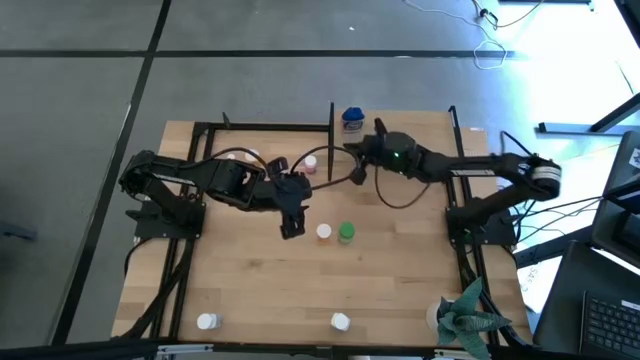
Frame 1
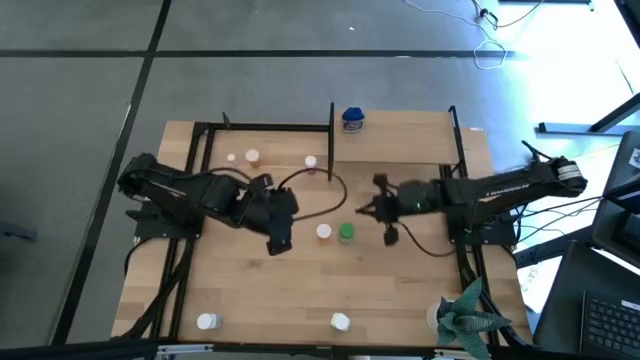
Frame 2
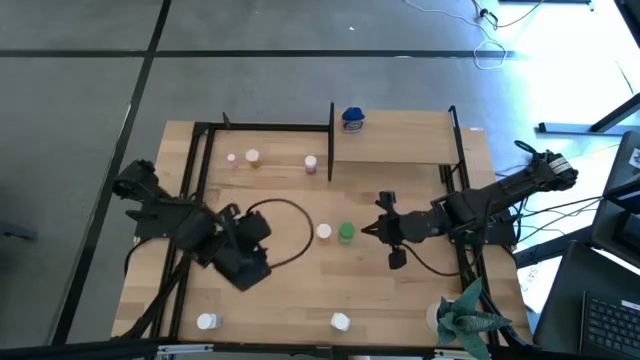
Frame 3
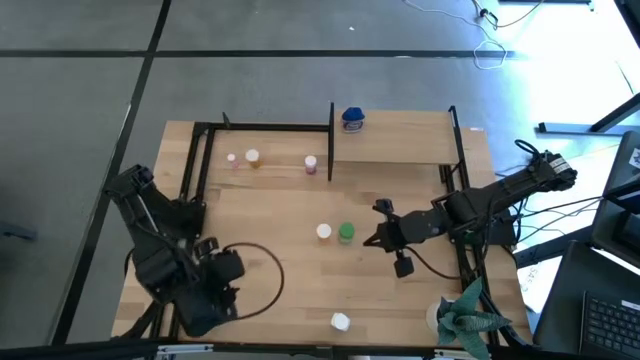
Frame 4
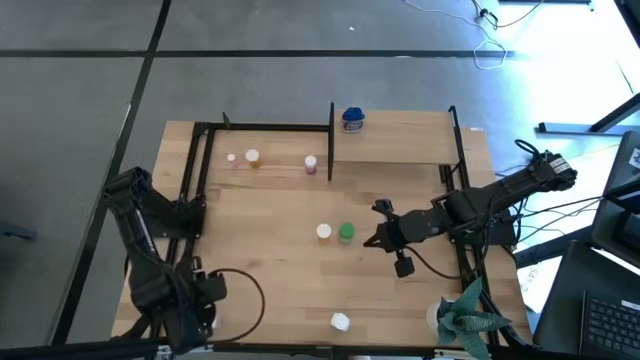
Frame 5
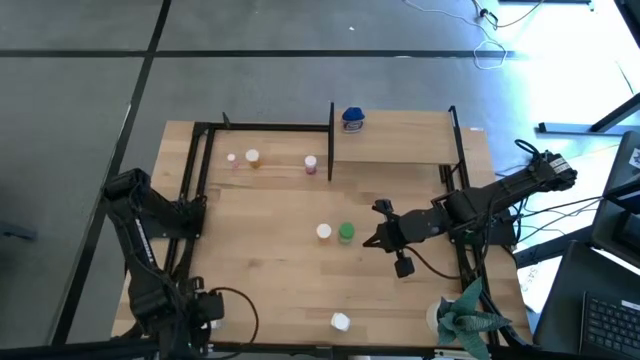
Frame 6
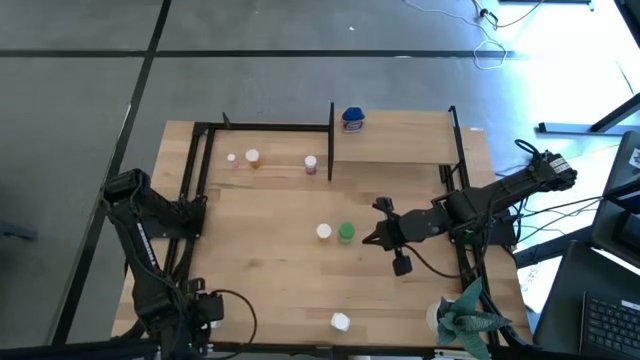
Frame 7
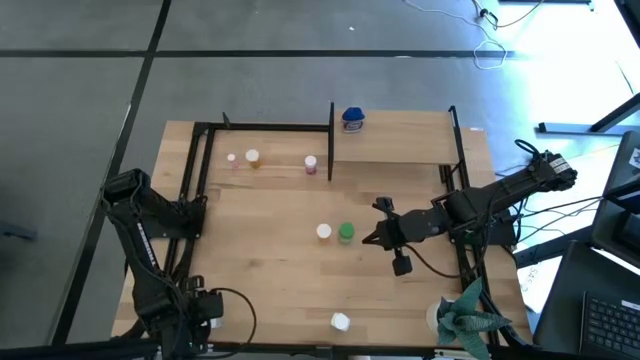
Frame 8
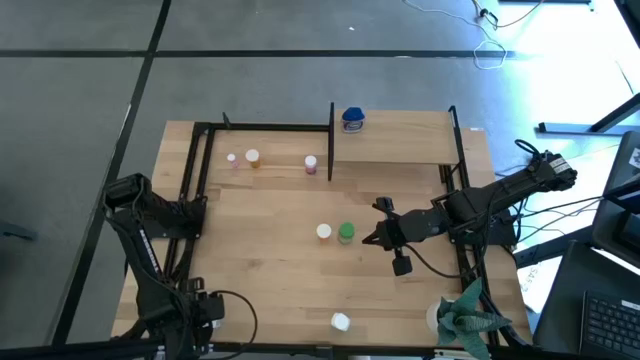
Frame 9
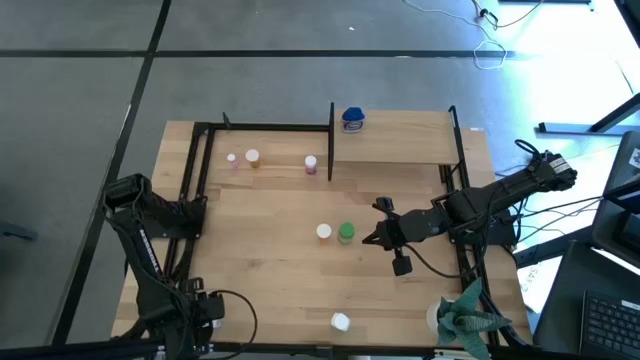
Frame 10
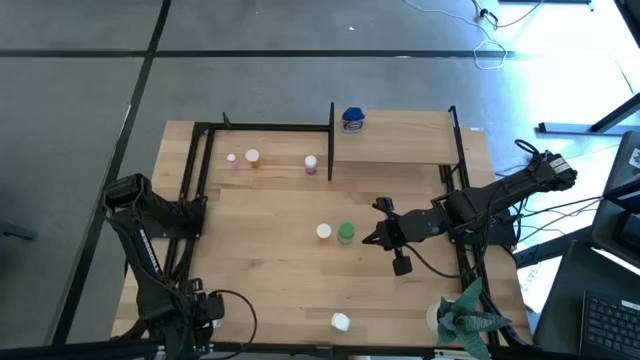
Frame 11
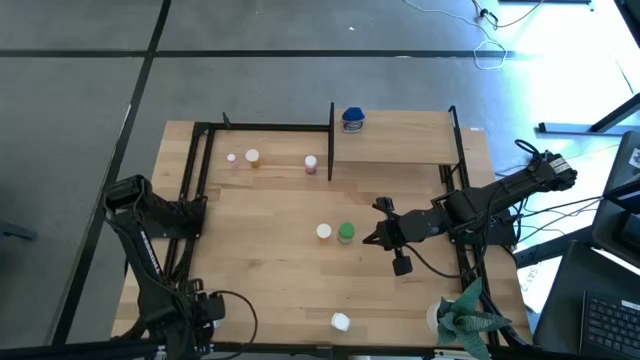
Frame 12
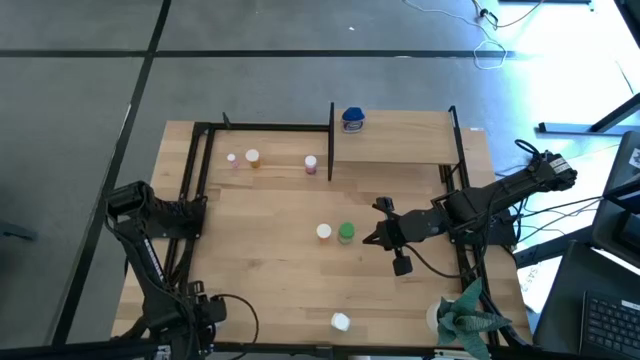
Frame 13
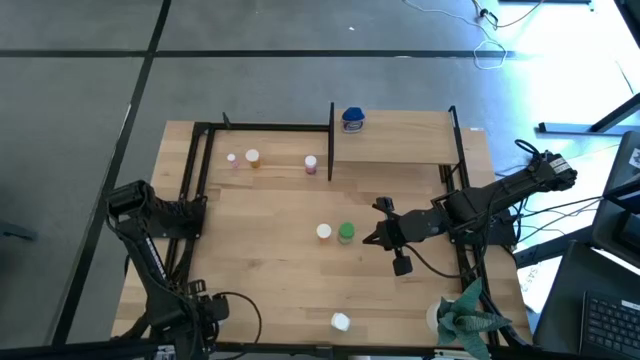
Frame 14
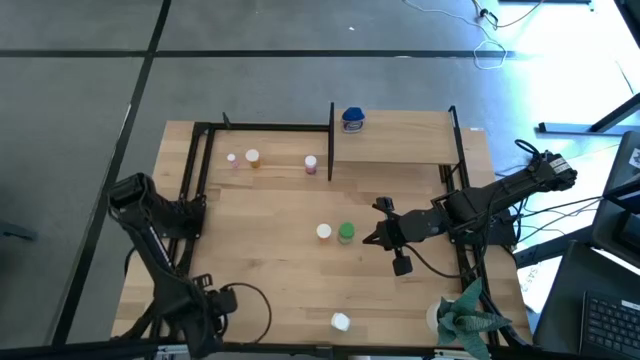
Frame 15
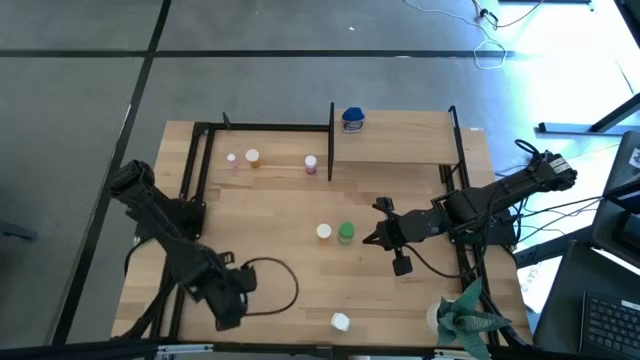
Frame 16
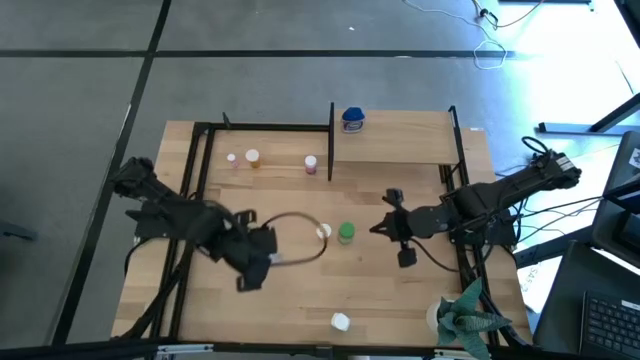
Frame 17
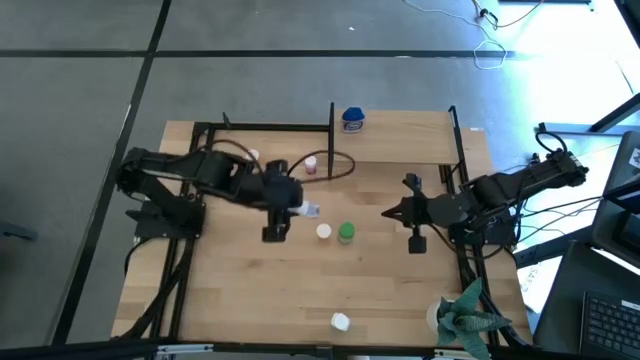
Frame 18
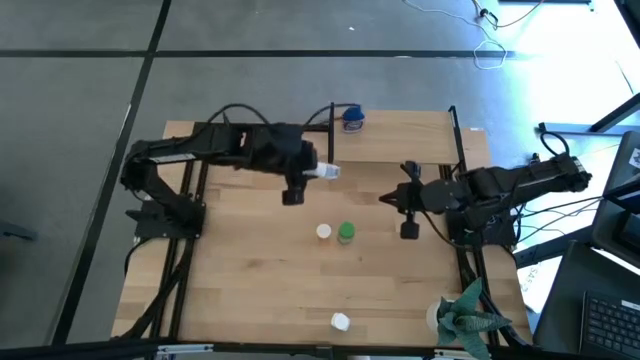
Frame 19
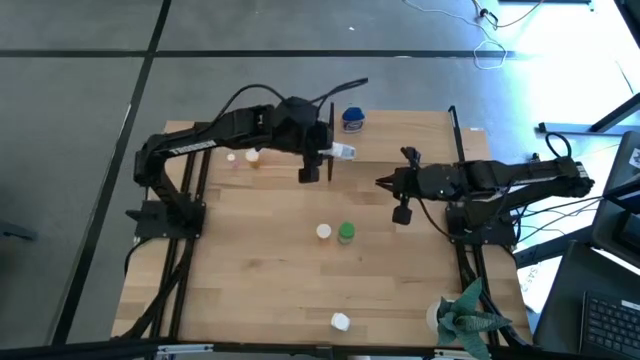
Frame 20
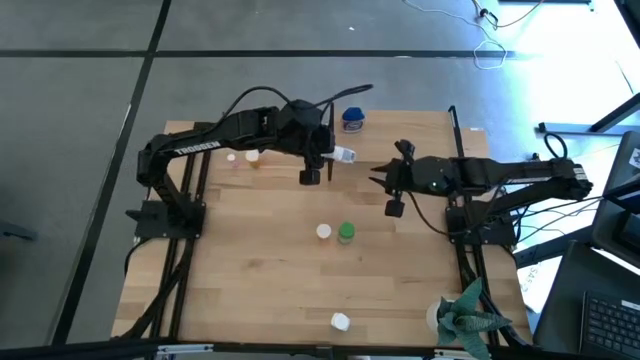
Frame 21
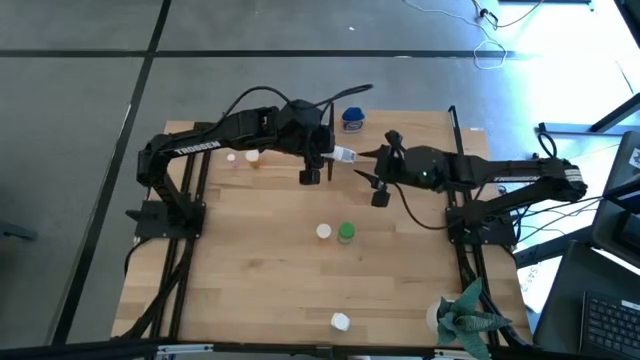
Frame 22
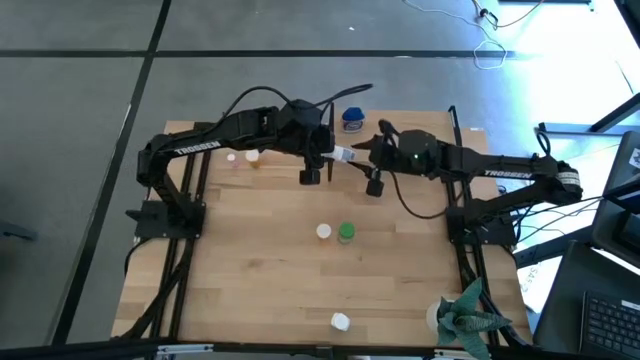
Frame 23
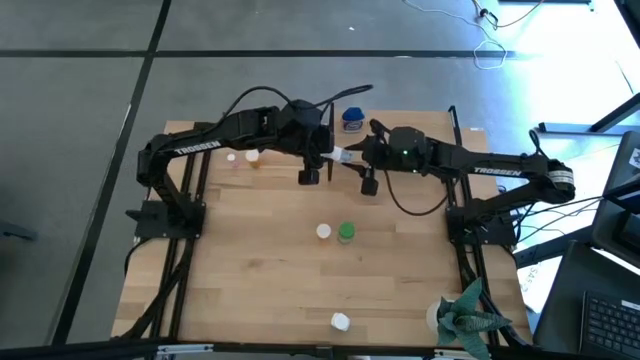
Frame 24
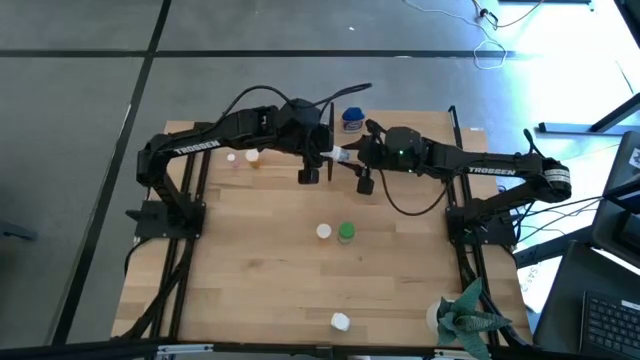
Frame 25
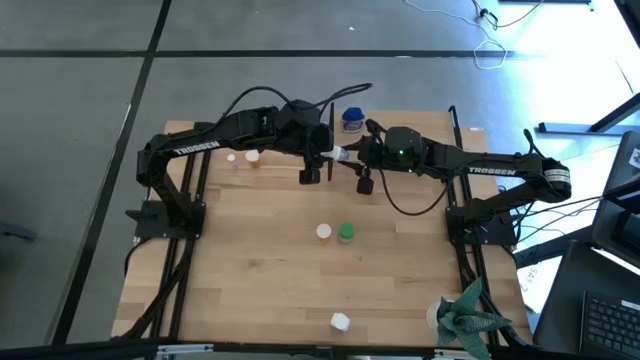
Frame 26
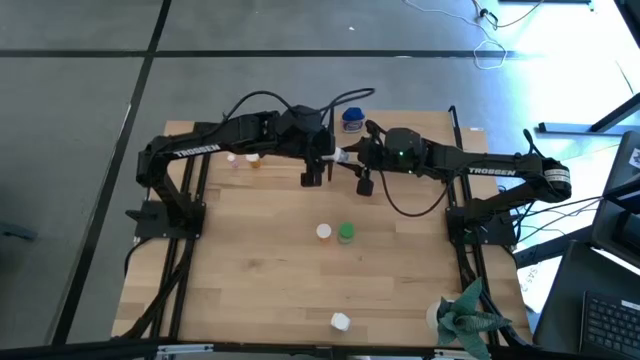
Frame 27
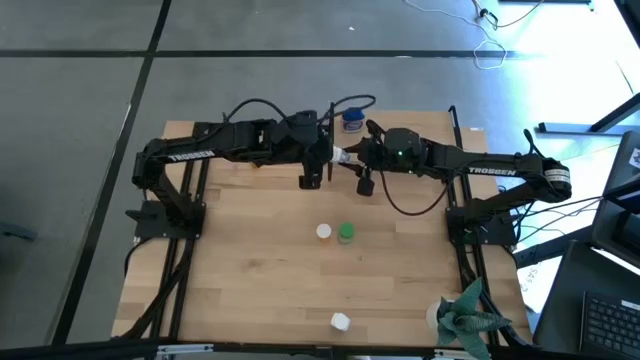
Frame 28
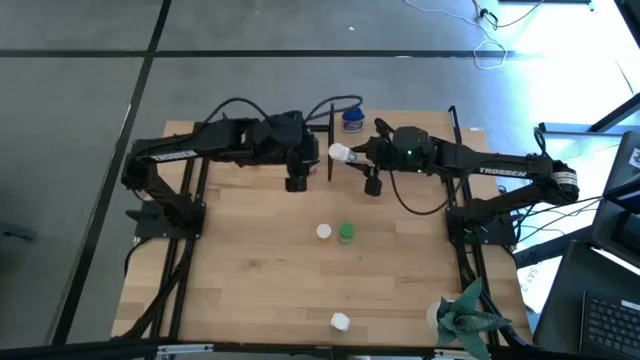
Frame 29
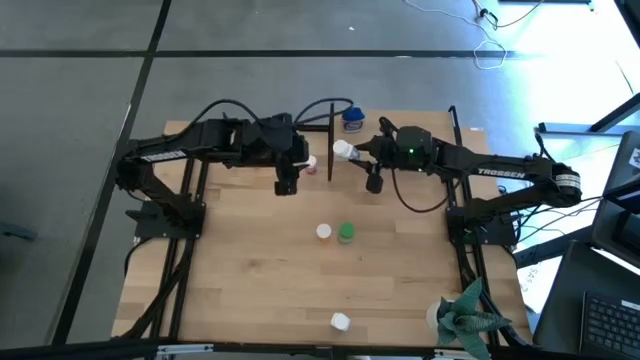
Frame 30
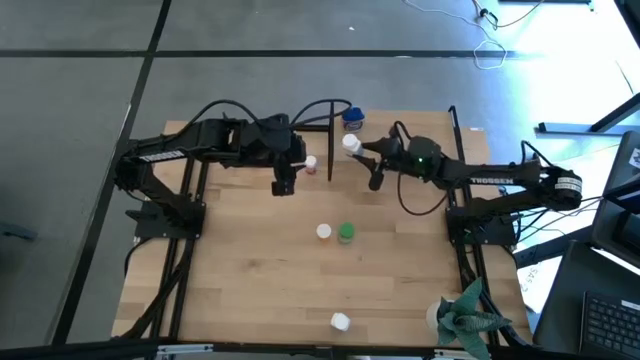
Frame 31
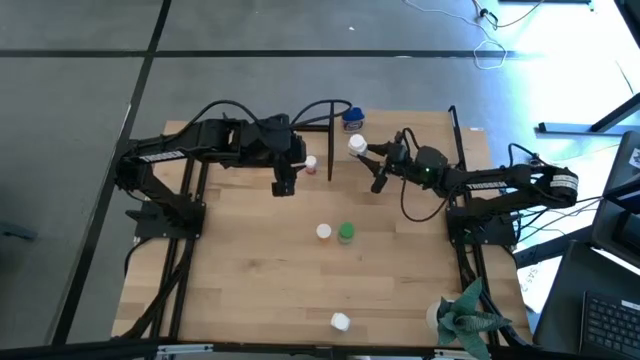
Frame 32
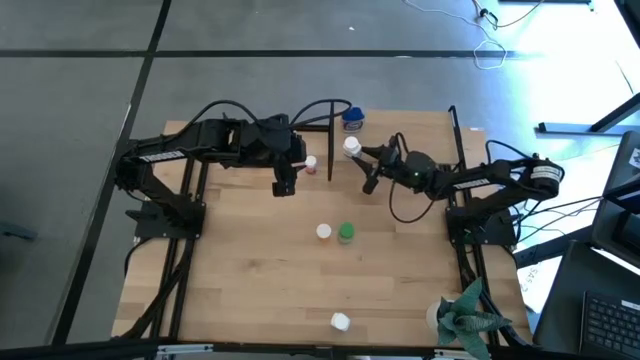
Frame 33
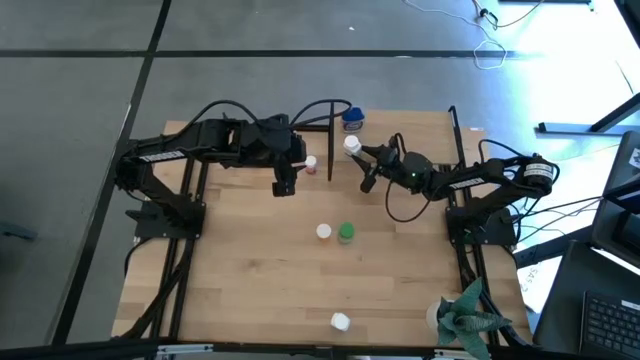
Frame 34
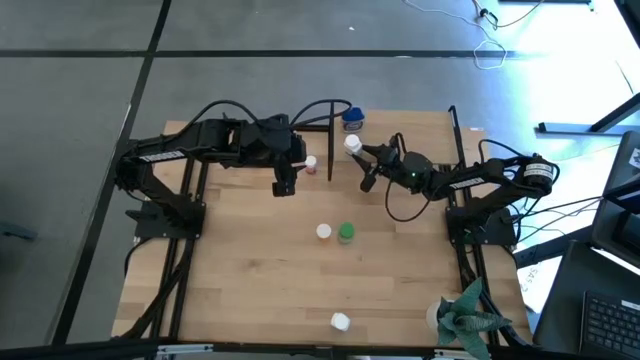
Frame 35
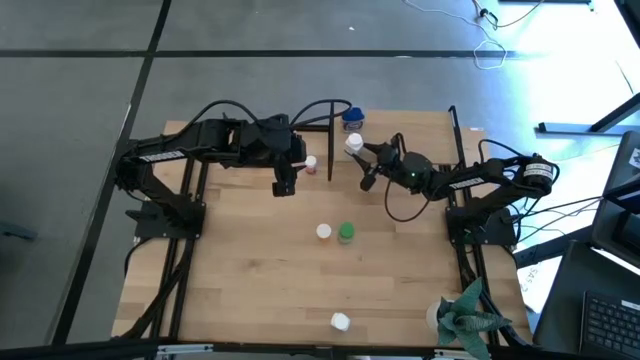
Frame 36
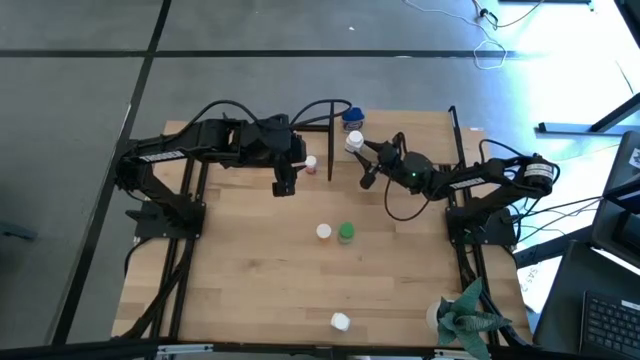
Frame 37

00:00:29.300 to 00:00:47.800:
Task: Pick and place medicine bottles onto shelf by color
Put the left white medicine bottle on the shelf

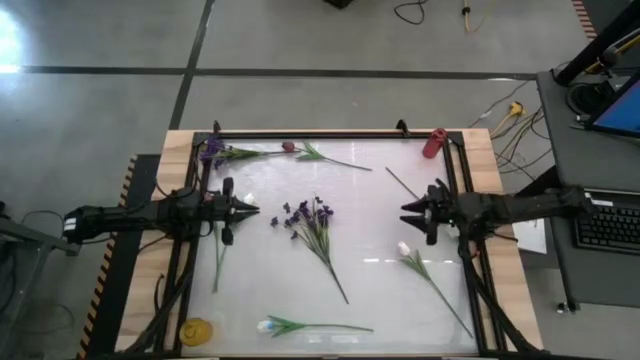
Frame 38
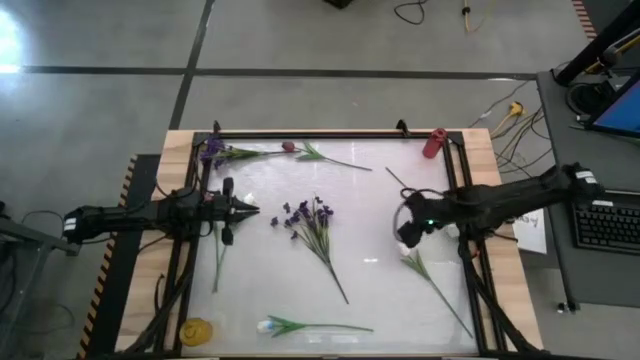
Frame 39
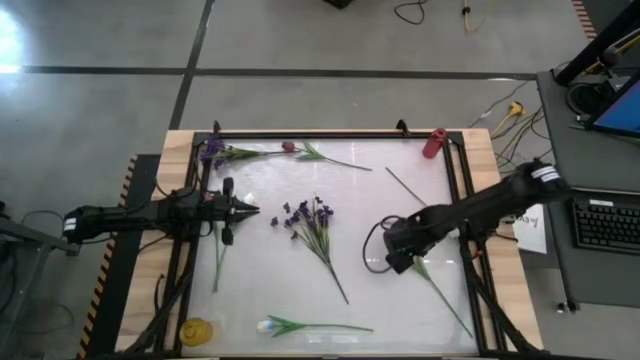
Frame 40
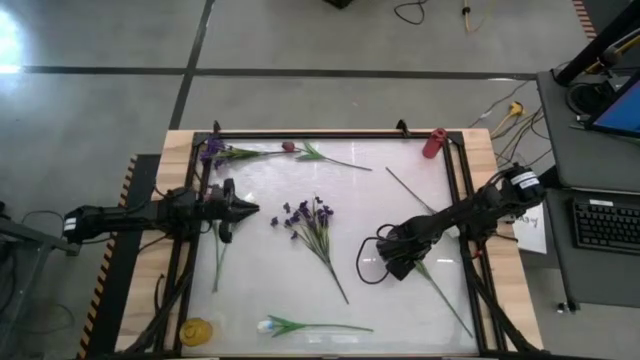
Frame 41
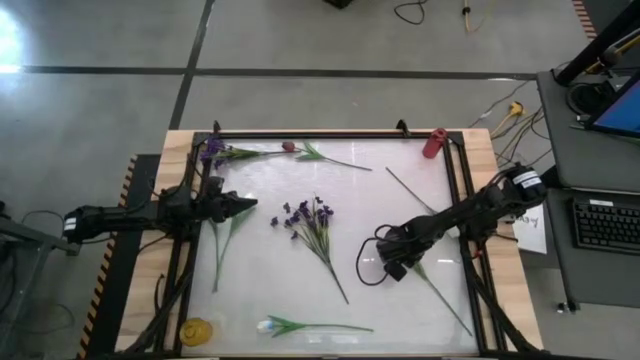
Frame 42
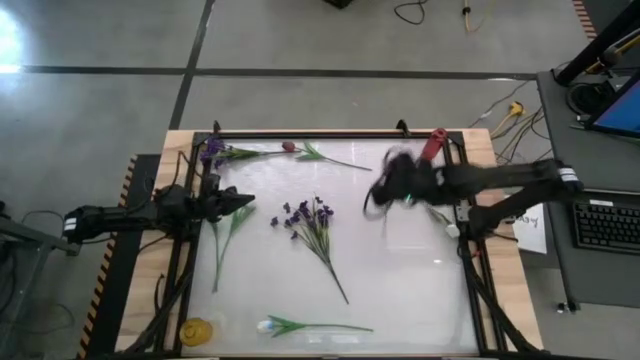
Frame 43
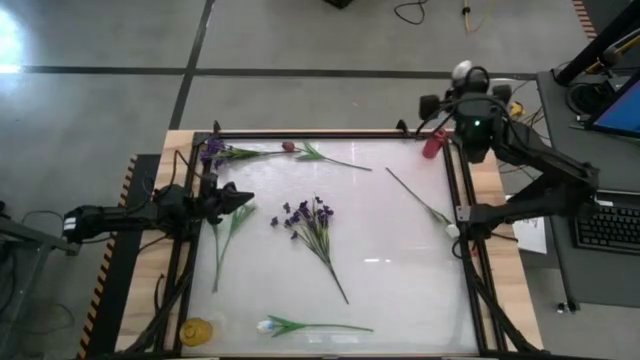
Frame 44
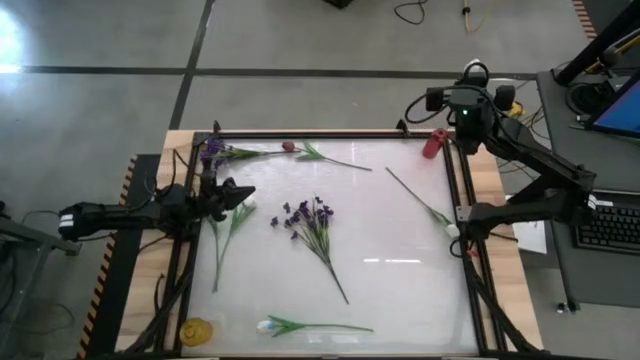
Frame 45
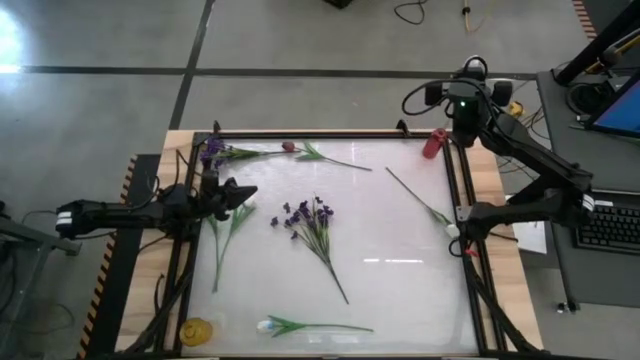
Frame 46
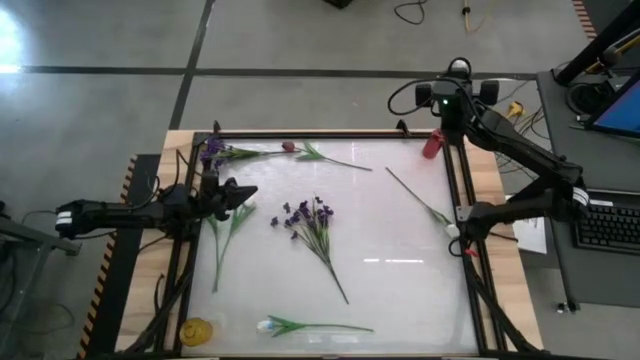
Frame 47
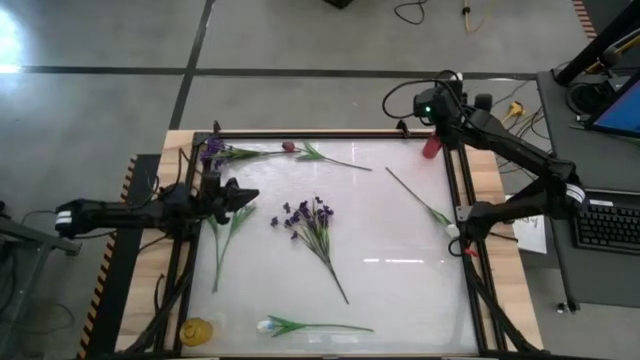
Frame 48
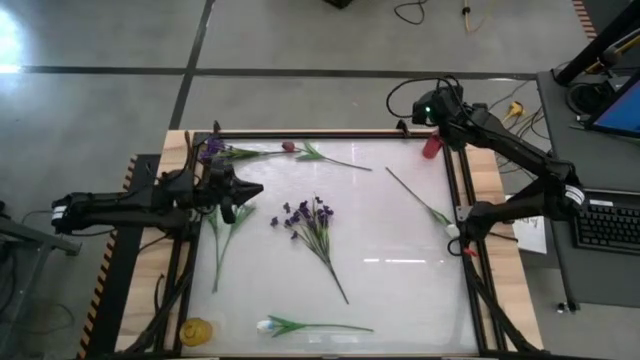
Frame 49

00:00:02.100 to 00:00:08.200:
Task: Sort flowers into vase by color
Put the middle right white tulip into the red flower vase
